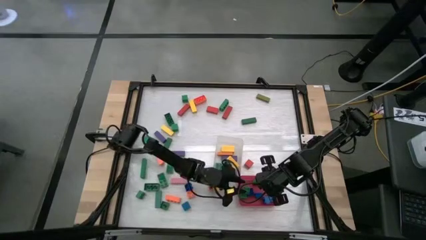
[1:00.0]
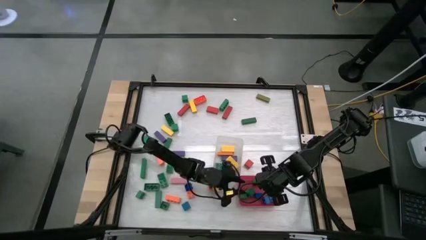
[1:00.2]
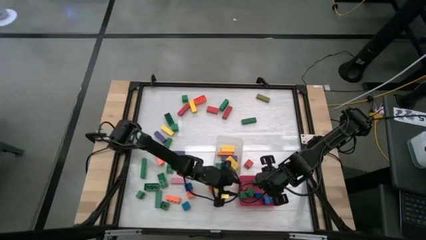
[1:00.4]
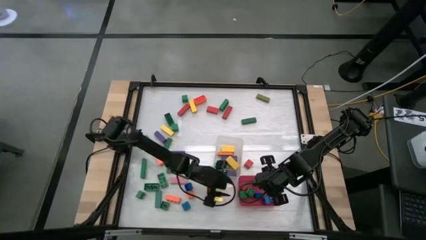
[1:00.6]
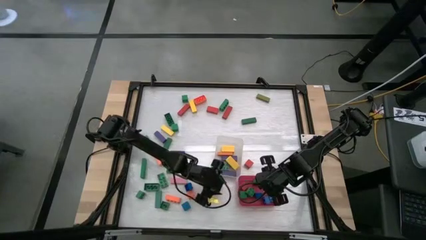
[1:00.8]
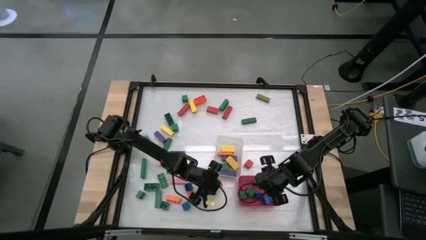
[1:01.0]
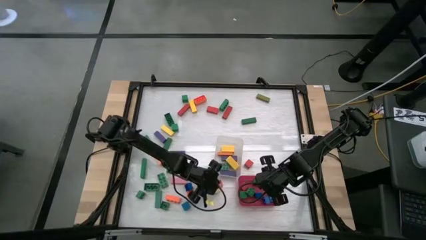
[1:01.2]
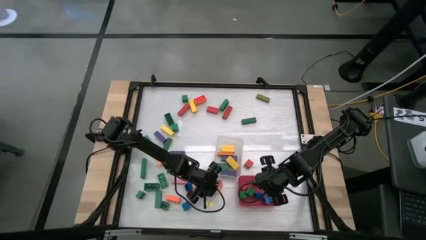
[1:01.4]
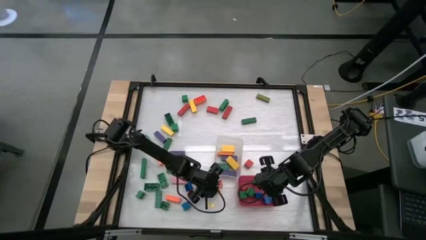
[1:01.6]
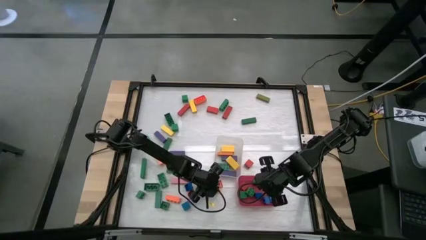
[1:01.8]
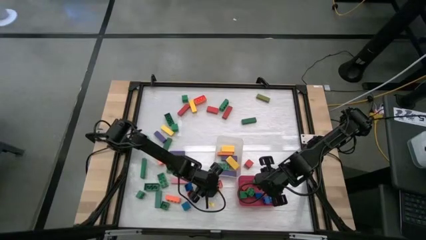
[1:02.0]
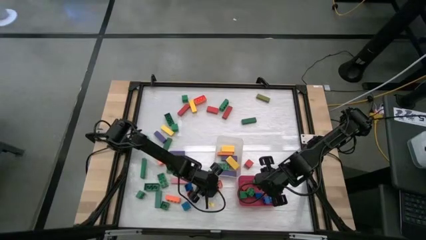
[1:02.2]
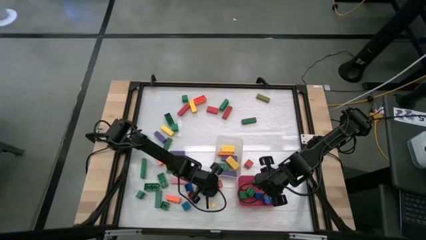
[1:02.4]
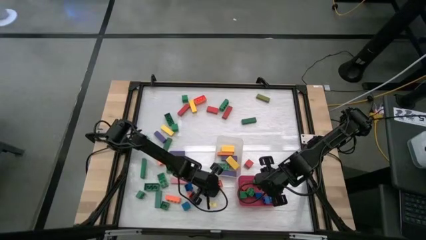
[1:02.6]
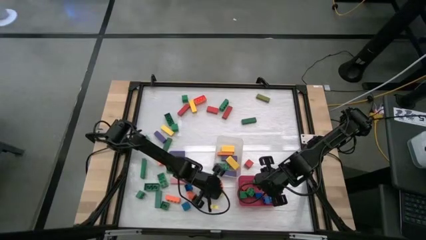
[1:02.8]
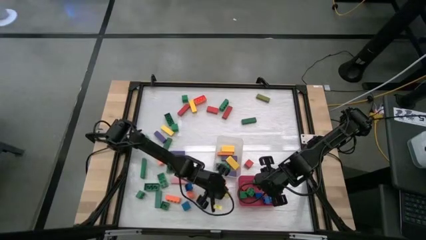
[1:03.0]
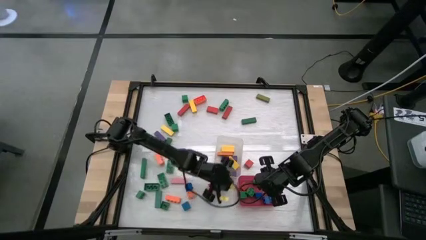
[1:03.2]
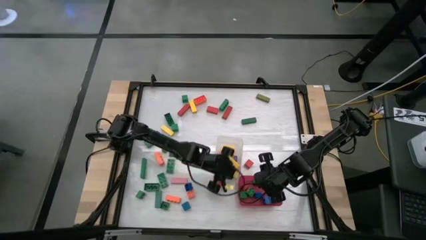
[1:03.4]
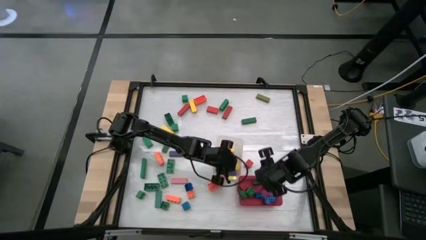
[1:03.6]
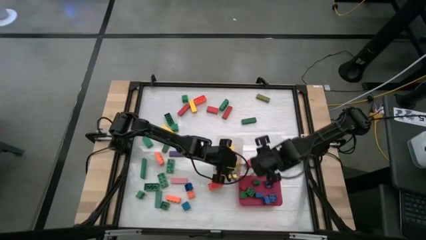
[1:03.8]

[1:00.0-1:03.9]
Task: Sort blocks by size
Put the yellow rectangular block into the transparent bin

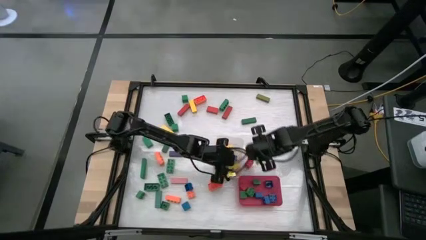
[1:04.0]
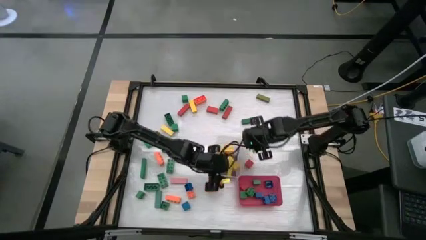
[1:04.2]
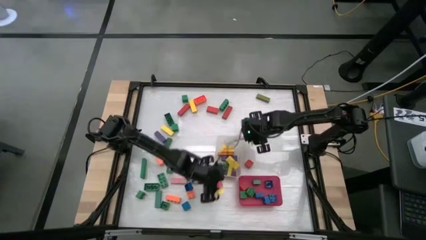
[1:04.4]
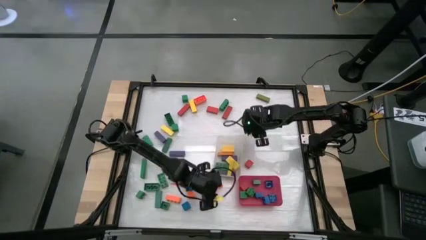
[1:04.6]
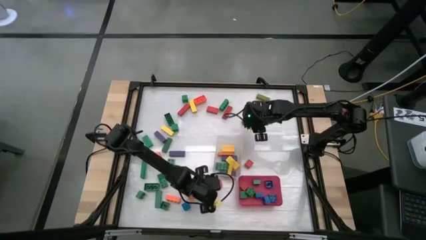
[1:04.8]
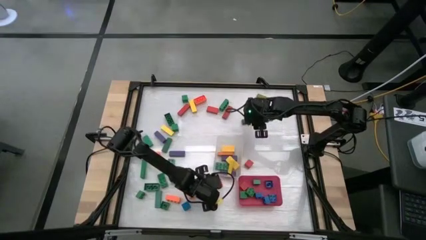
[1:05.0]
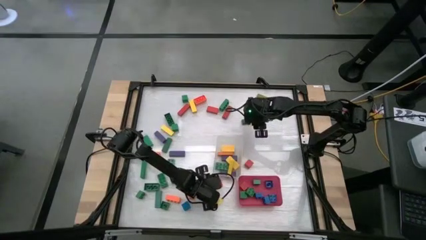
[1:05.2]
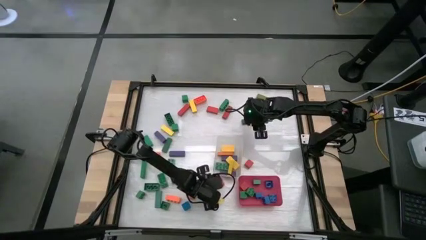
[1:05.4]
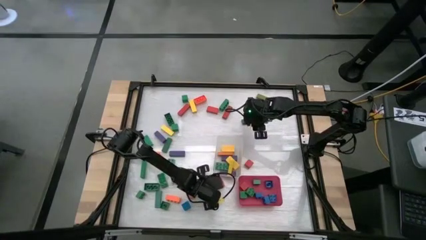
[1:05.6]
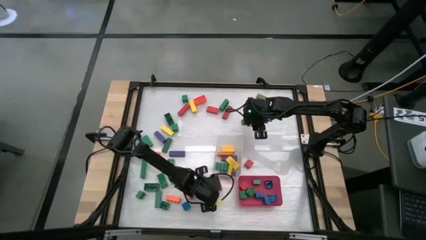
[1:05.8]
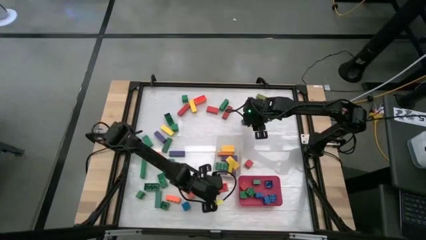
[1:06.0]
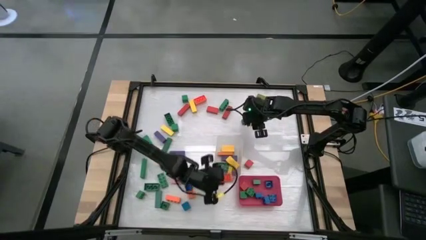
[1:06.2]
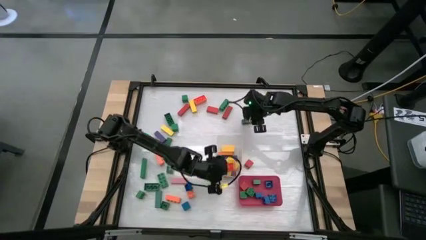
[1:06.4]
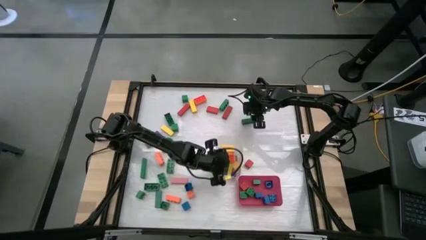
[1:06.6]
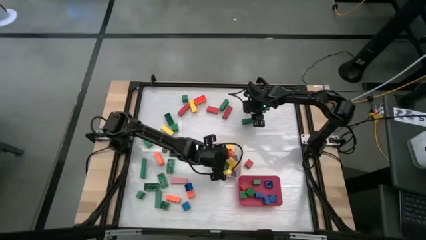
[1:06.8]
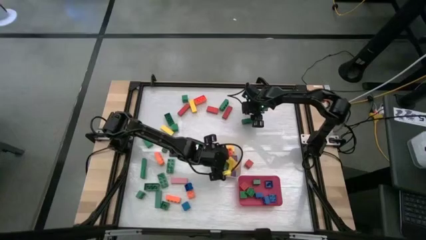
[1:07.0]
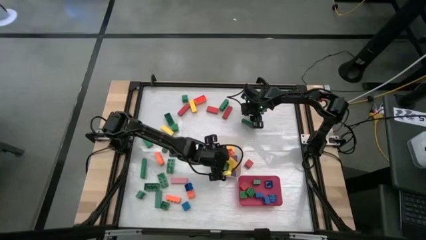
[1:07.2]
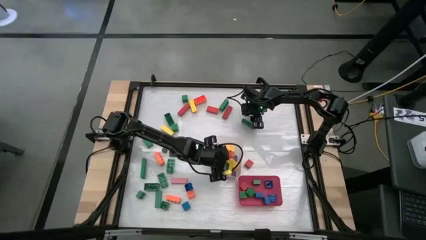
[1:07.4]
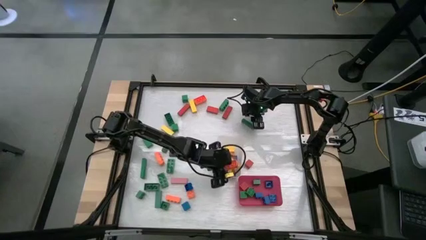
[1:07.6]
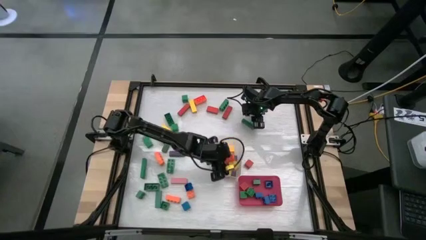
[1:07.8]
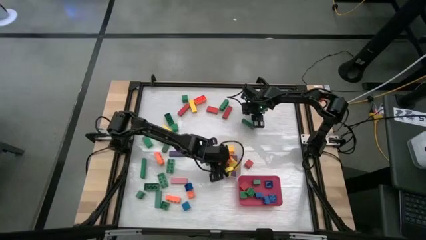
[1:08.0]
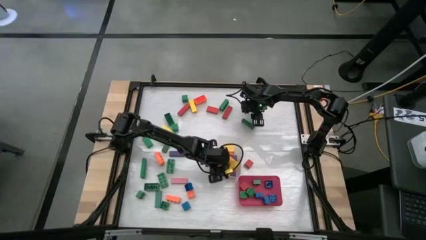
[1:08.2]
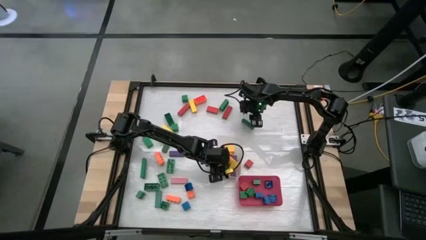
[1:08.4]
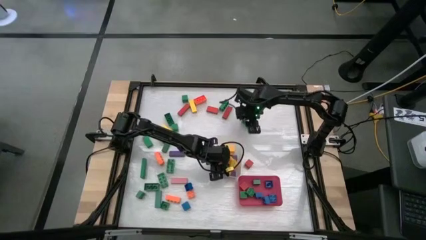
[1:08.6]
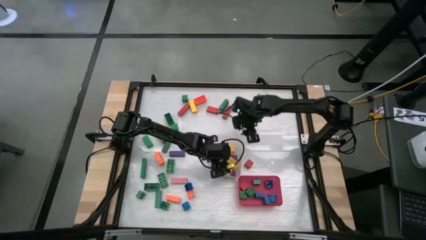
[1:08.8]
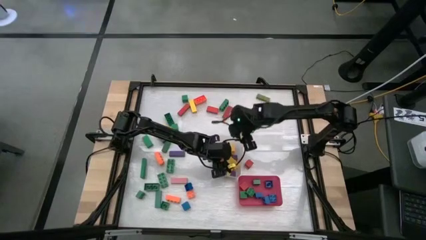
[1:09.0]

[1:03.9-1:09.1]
Put the orange rectangular game piece into the transparent bin

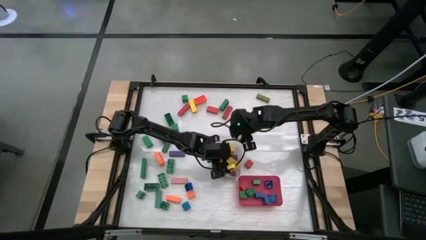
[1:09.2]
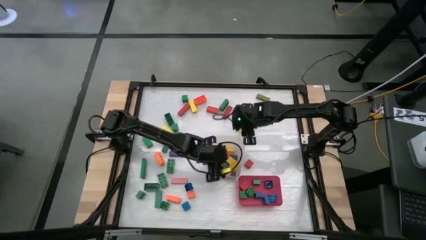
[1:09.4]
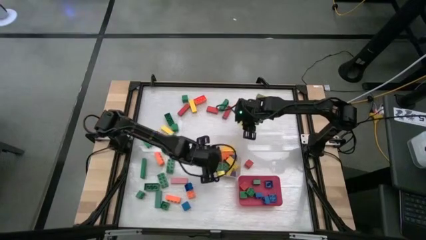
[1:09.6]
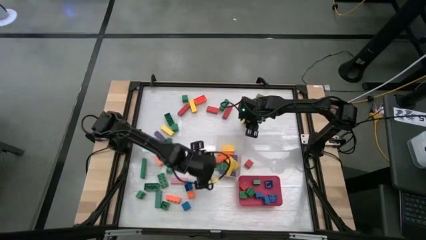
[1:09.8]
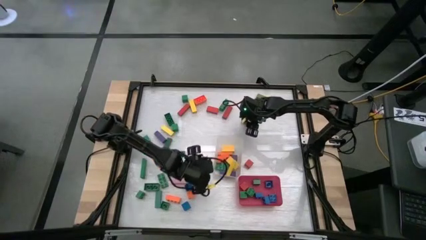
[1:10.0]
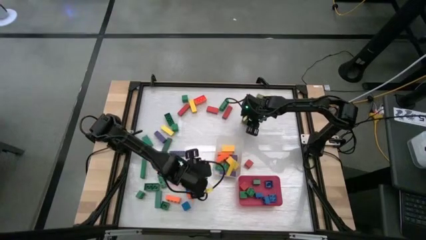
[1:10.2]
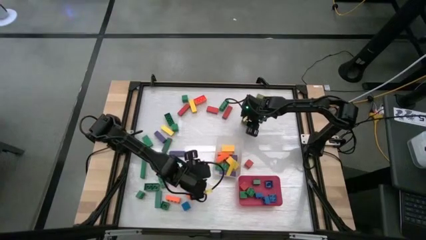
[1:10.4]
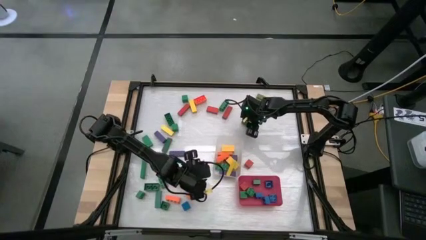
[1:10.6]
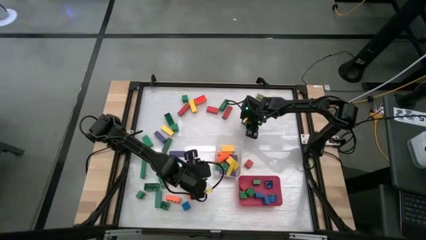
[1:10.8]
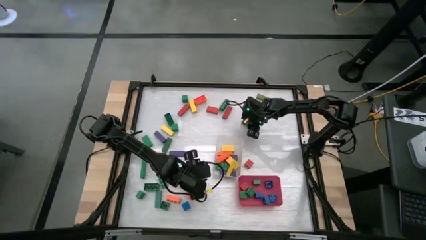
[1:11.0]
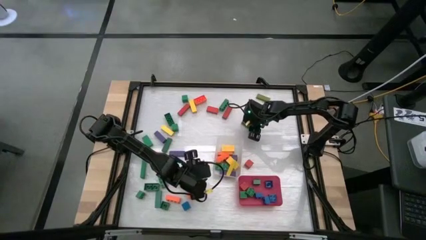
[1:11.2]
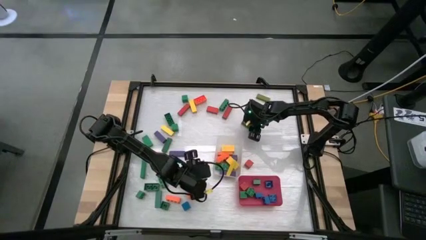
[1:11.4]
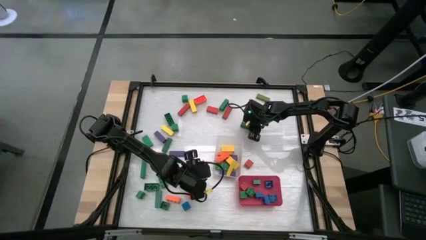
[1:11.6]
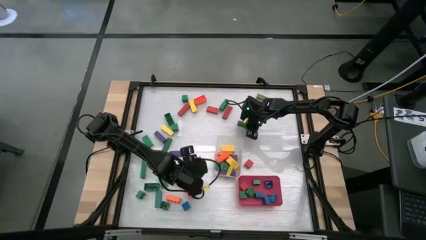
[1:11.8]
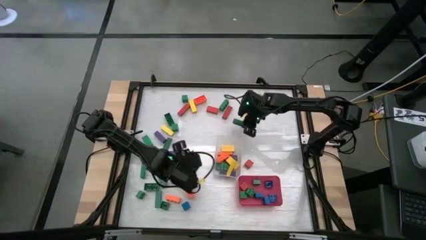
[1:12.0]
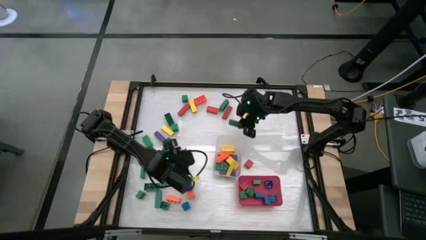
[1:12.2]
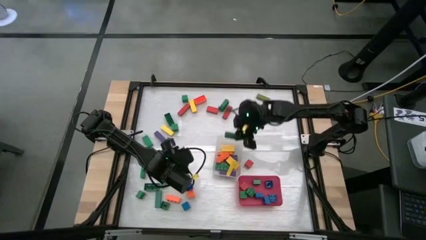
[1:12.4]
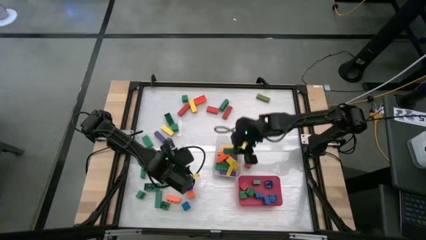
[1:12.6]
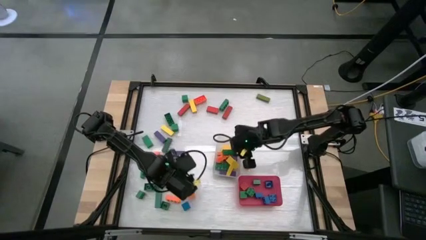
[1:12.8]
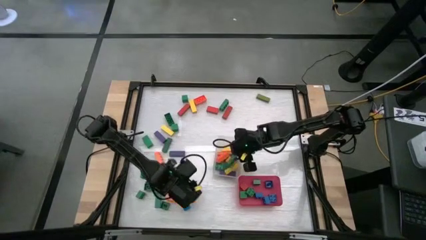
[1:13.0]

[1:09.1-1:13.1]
Put the green rectangular block into the transparent bin

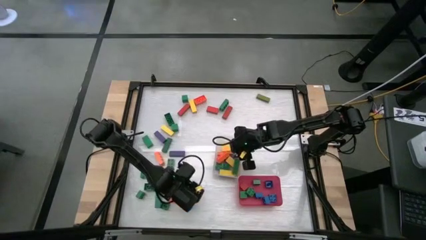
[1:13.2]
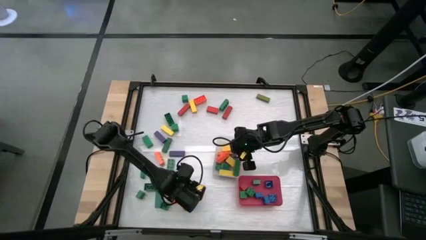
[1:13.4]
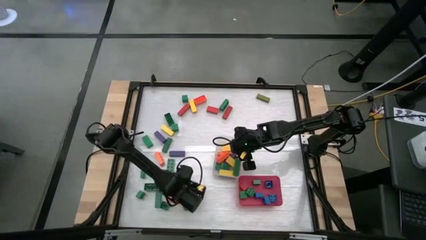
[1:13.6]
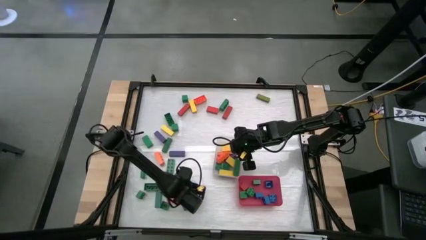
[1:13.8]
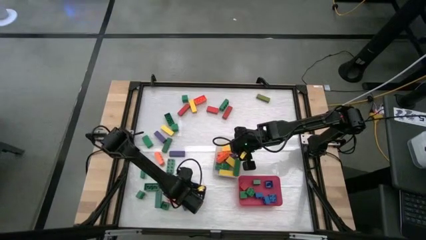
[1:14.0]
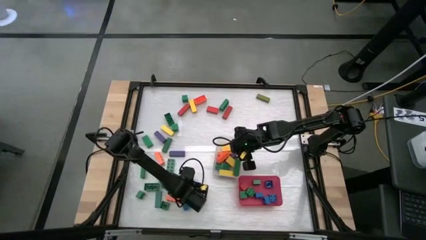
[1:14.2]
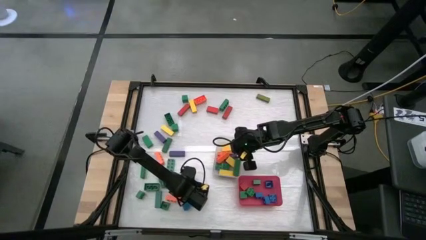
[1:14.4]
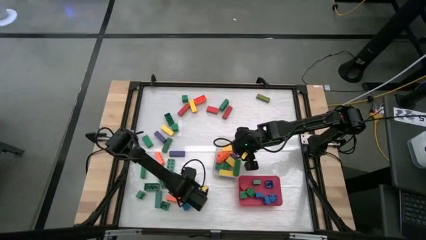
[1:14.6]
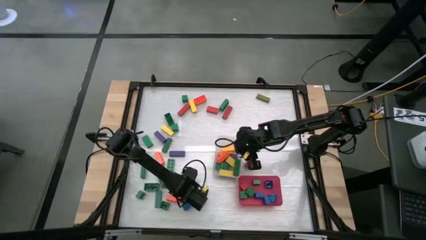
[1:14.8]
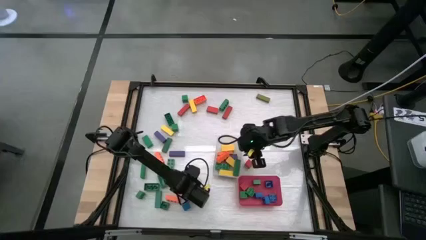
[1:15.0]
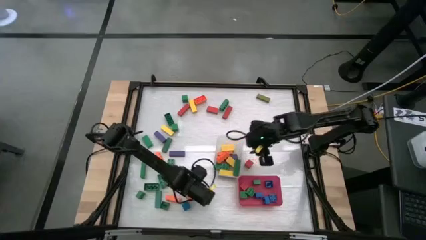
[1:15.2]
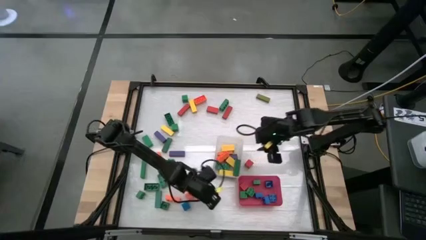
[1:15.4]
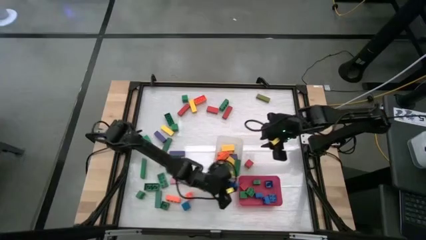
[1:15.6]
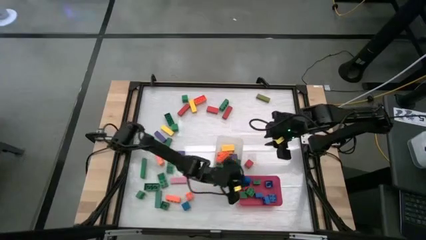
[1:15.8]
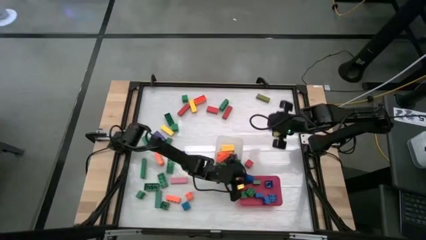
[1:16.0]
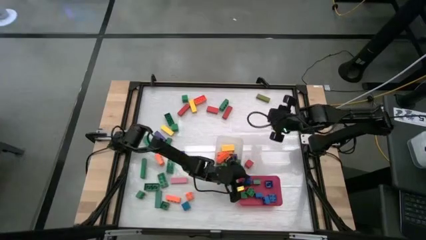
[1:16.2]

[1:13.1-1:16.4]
Put the blue square game piece into the red bin
